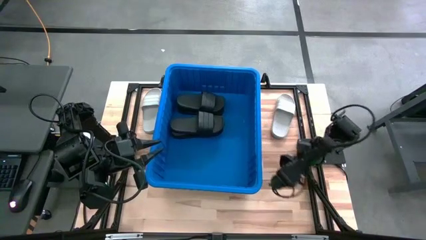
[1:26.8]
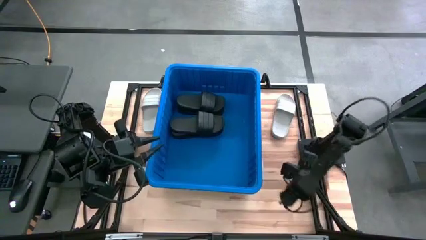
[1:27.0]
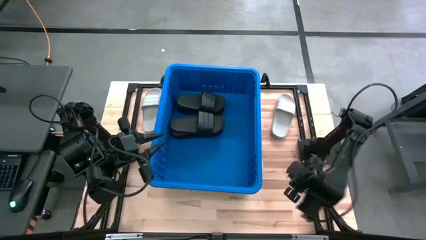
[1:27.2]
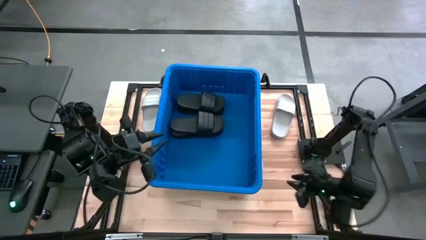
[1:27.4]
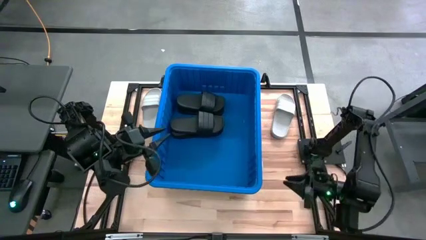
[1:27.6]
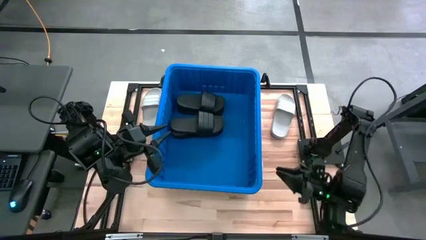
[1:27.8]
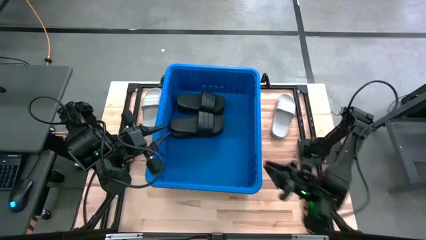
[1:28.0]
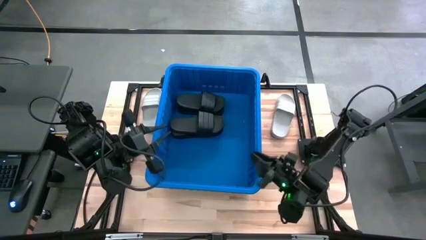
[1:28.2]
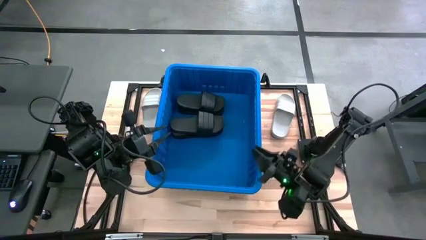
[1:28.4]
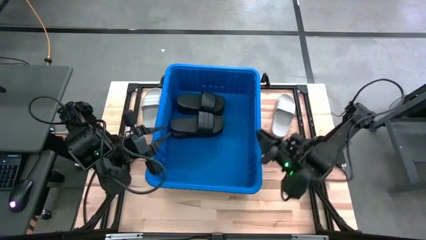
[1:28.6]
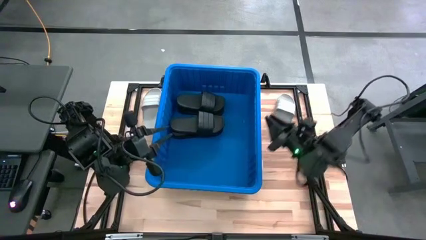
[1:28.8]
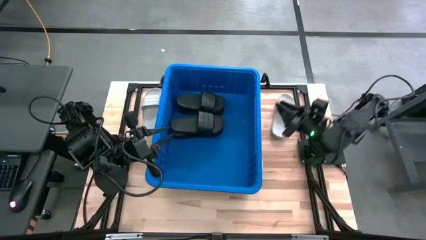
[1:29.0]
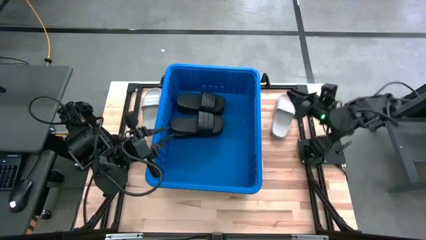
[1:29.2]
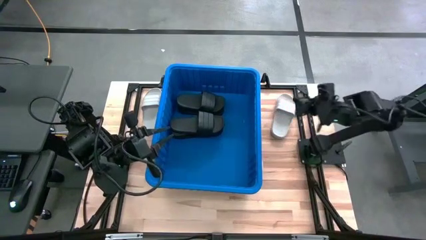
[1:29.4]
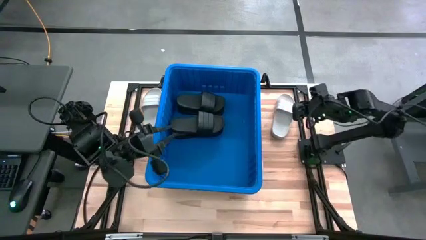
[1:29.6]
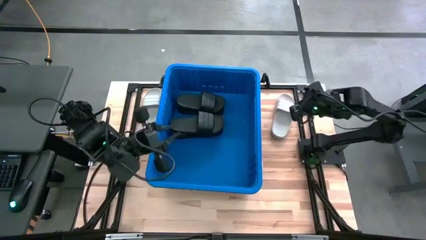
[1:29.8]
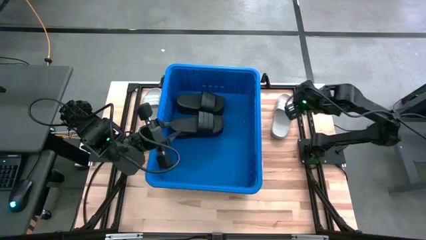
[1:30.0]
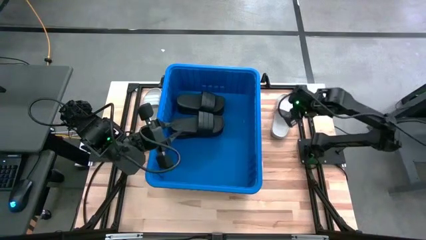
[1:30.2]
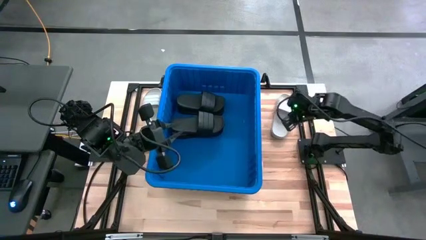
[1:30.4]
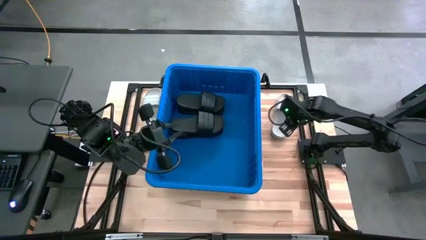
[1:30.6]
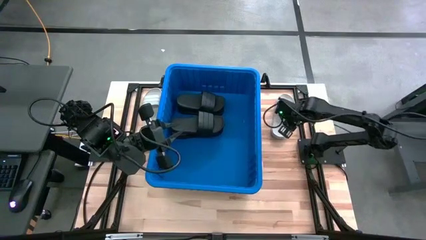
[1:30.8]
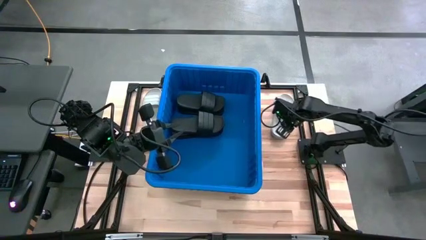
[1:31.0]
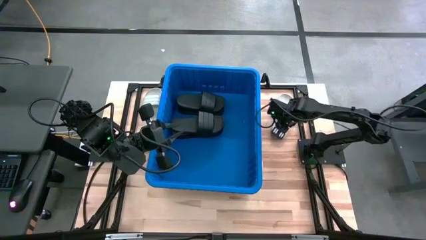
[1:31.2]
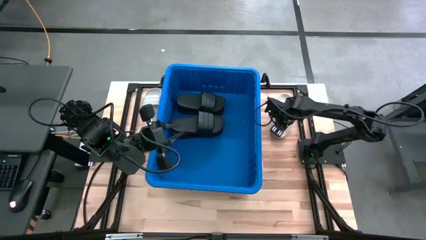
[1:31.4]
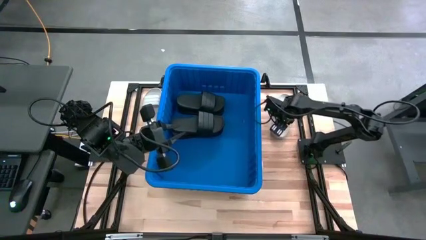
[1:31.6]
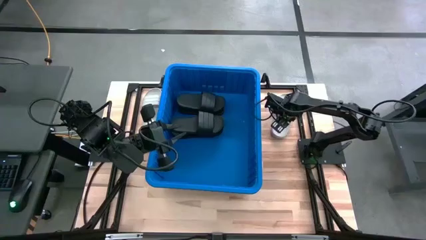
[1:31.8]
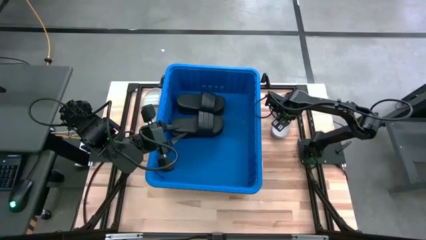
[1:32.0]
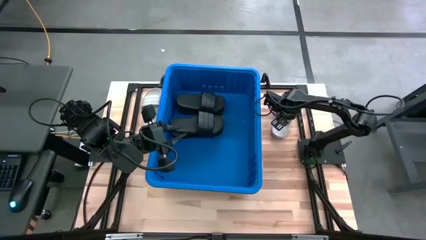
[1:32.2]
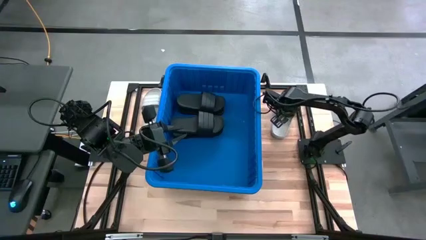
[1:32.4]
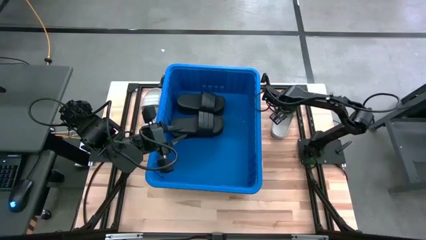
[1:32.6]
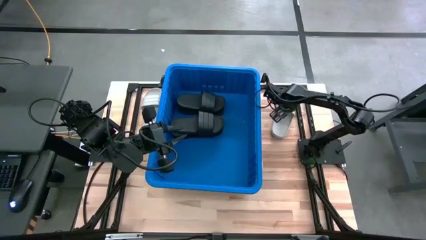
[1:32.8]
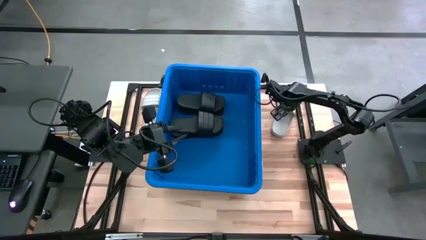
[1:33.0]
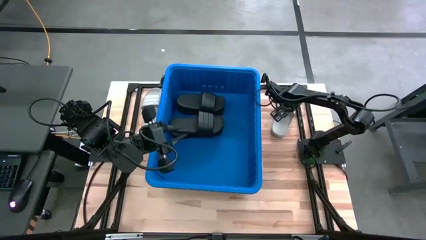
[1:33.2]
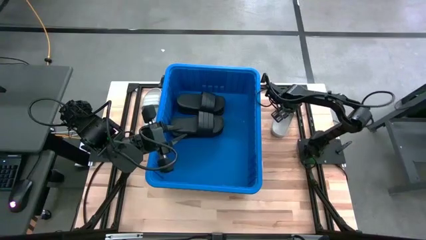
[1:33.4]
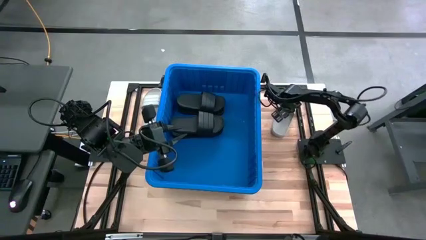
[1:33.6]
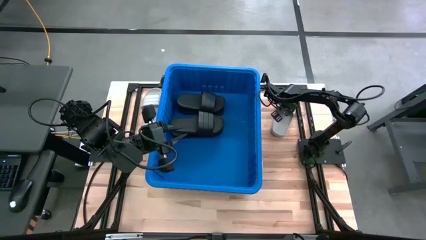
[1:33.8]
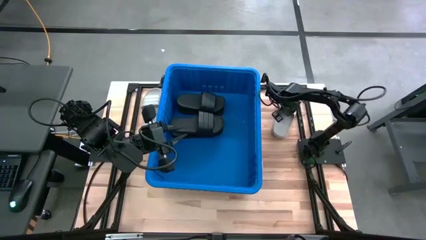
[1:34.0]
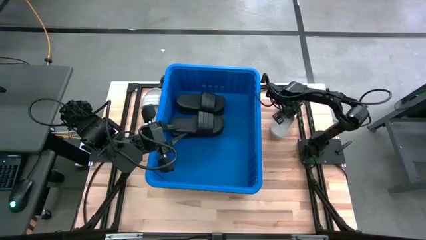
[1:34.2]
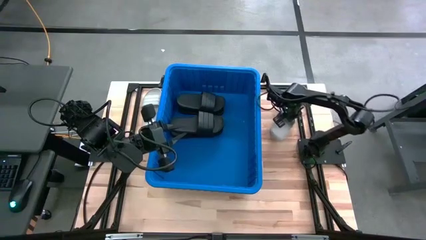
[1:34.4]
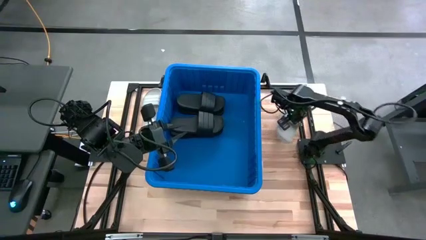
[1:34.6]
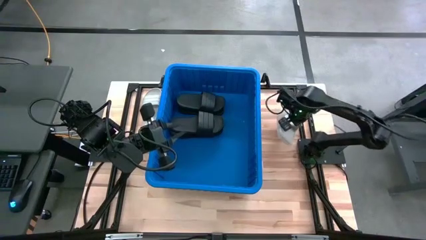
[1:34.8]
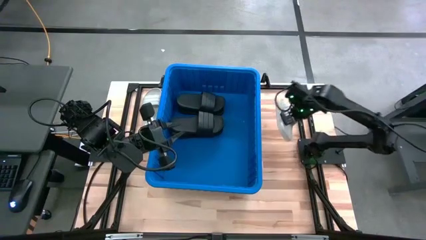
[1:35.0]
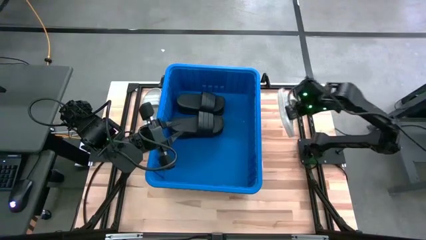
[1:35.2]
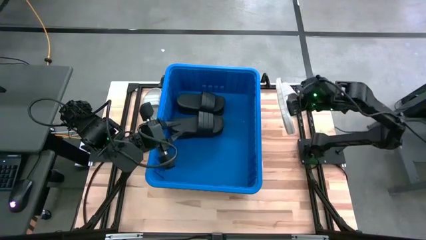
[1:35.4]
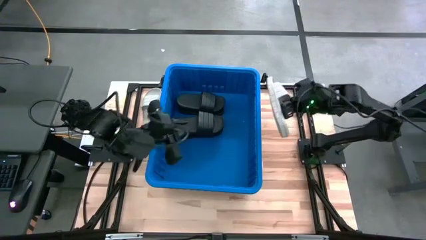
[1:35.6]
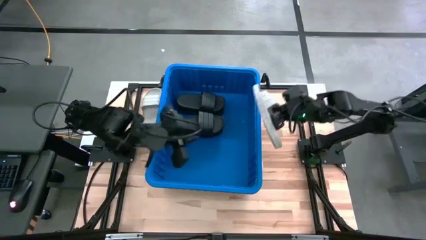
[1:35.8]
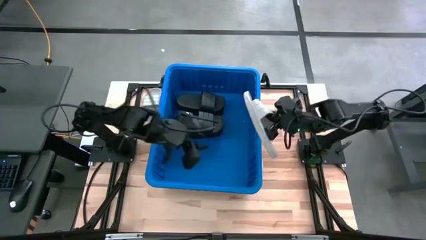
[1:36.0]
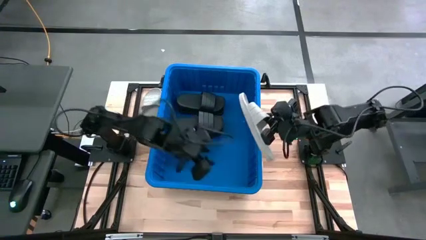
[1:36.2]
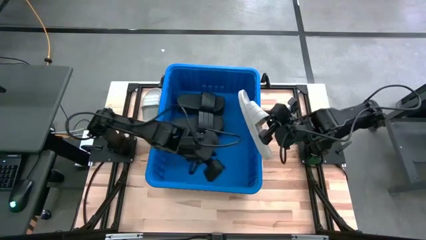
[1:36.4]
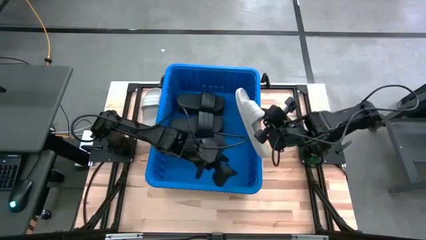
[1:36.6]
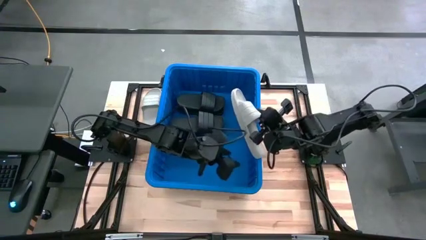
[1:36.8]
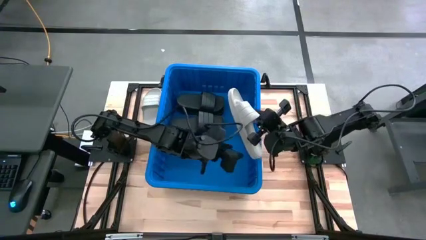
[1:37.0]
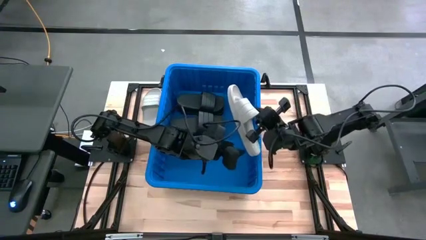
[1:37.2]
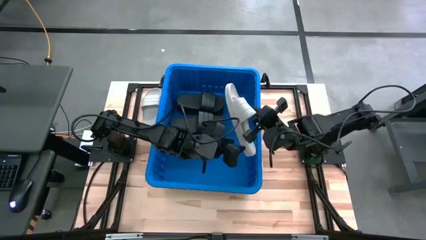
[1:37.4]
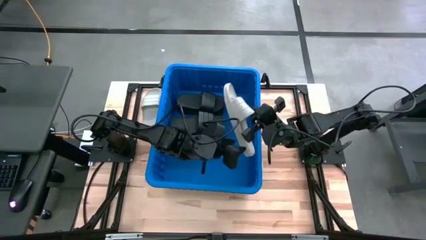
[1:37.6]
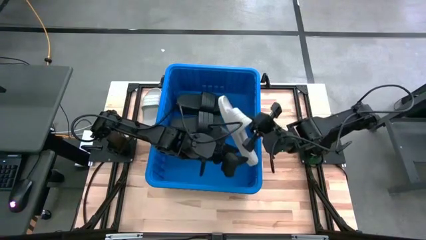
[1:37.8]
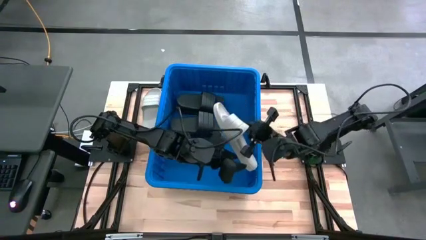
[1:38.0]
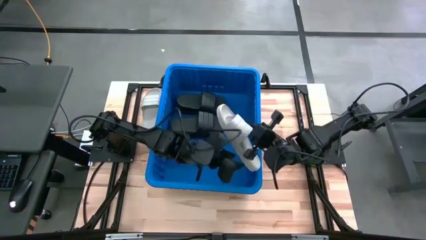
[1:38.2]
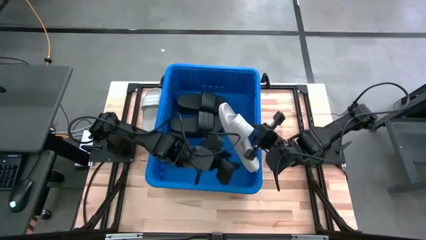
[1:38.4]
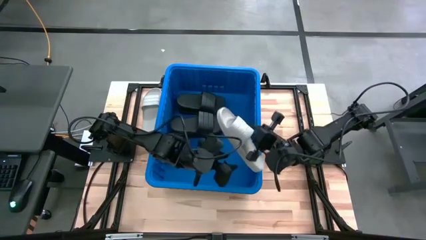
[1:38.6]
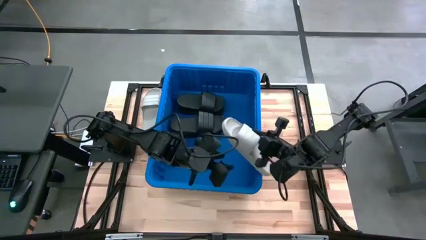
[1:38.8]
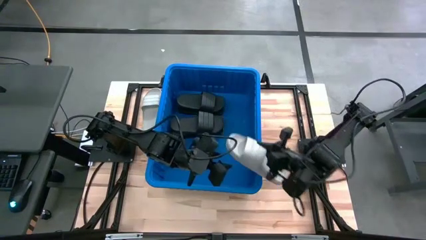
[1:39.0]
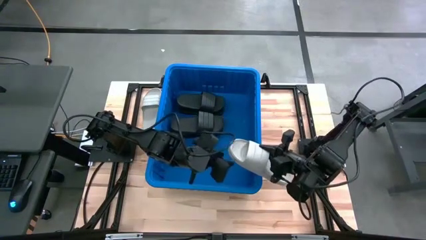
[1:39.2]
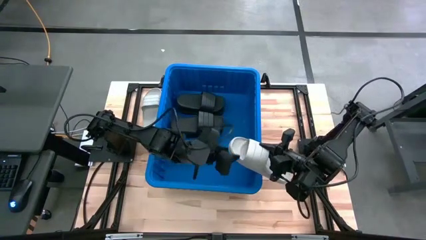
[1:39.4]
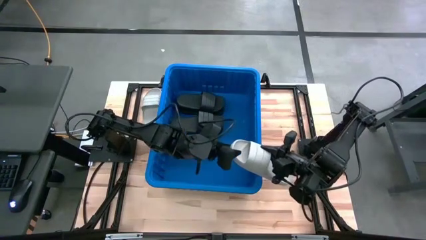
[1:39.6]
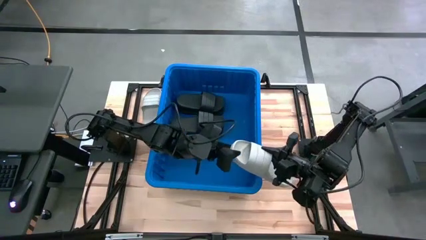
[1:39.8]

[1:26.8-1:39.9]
Task: Pick and place slides into bin
Put the right white slipper into the bin

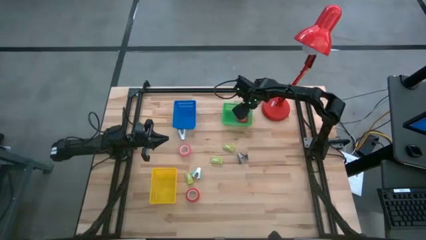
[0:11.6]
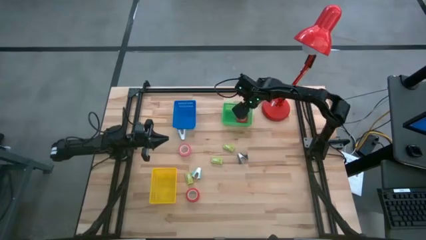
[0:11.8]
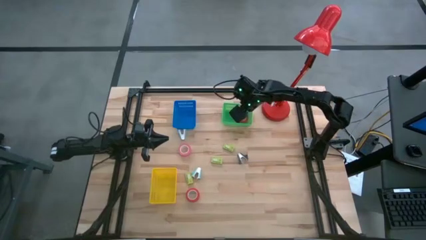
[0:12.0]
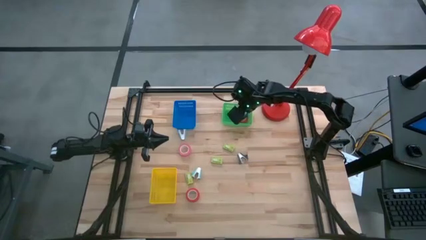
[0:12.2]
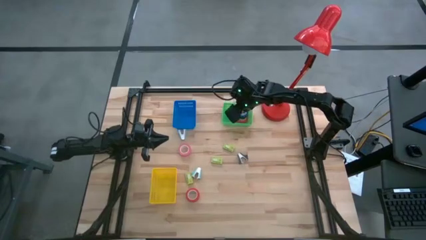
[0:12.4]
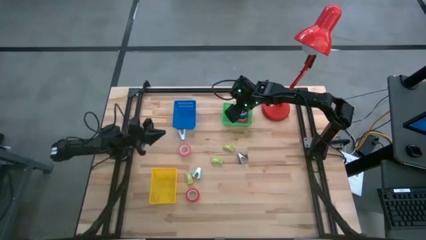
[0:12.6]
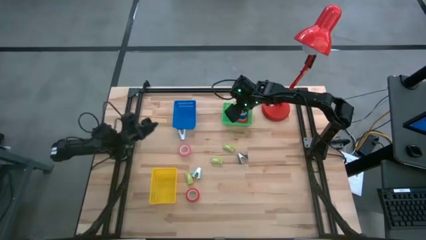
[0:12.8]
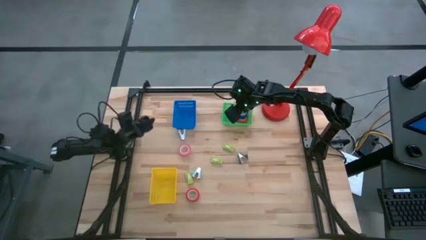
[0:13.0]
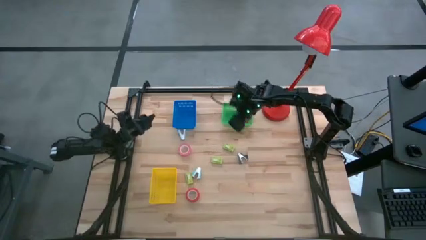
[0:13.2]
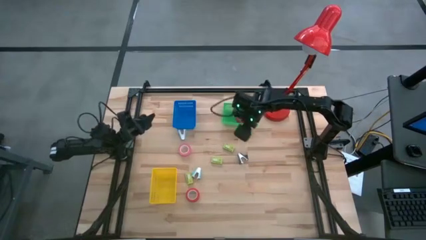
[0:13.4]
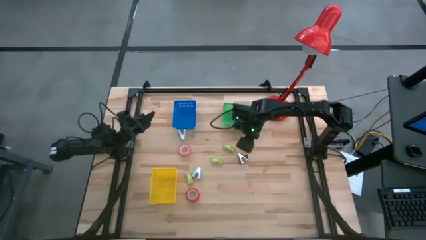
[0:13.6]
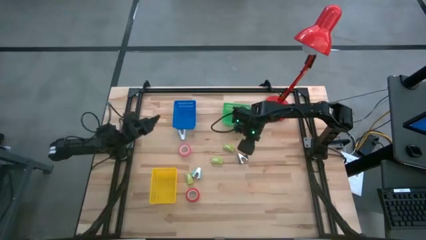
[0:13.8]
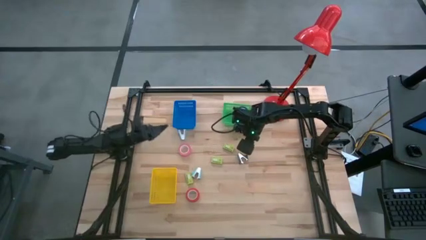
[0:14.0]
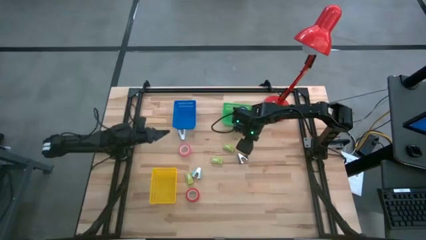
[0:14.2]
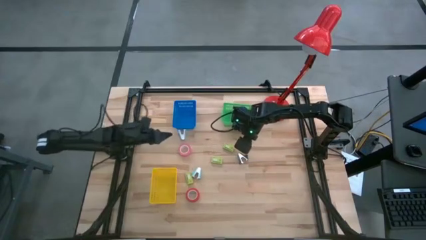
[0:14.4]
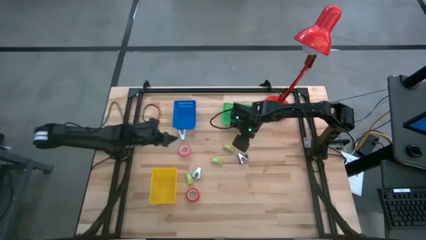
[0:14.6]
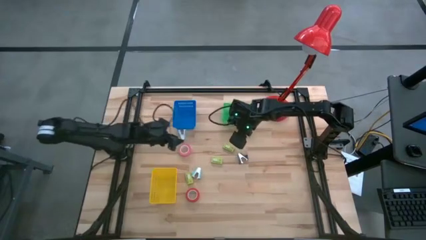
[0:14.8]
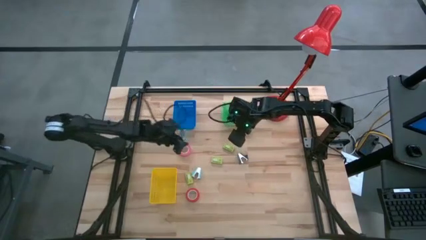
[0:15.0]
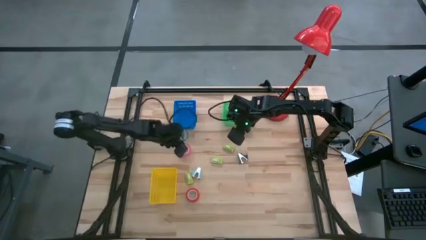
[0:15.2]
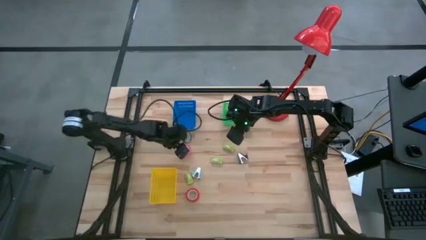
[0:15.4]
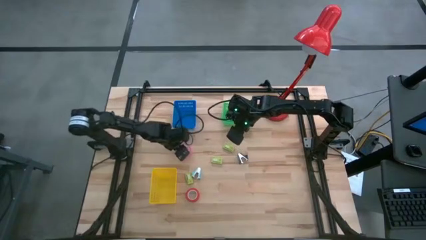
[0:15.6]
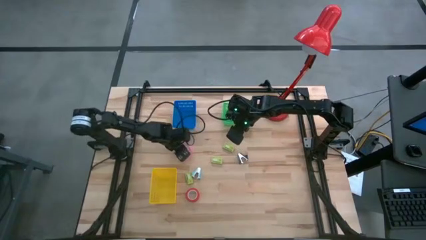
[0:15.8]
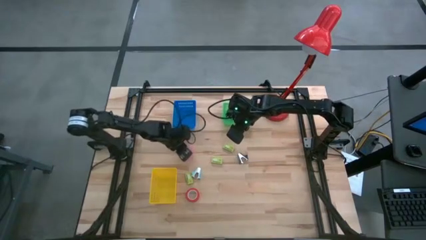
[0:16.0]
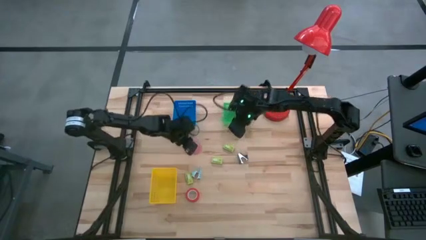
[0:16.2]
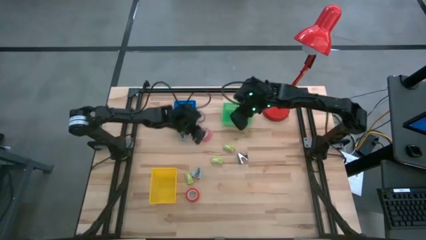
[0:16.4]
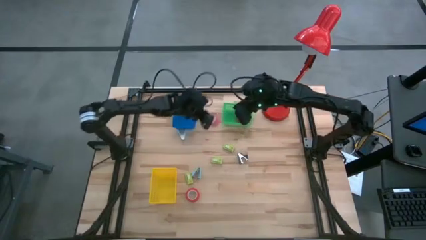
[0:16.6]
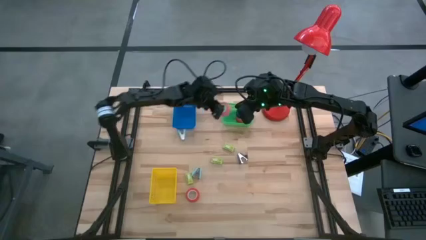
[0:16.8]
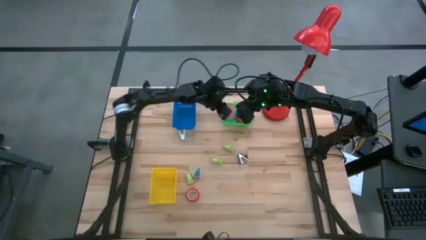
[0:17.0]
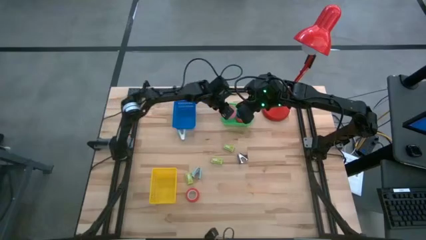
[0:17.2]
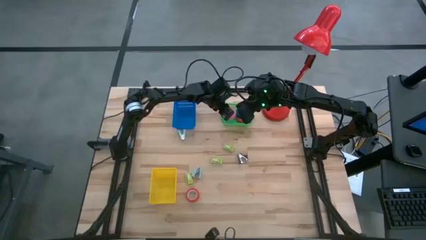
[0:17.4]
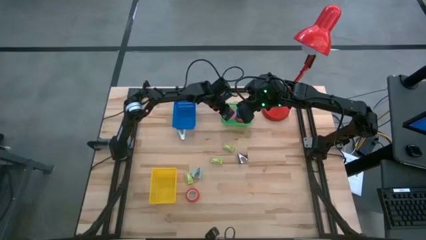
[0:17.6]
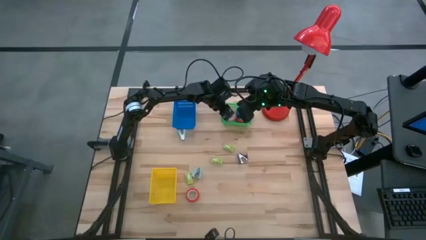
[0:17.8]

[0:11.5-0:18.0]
Task: Pick and place Stapler, Stapler remover, tape
Put the pink tape into the green basket
